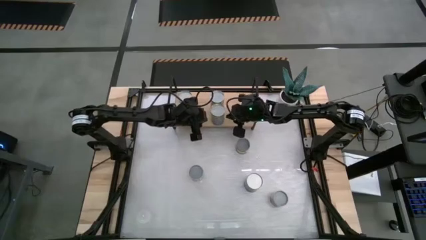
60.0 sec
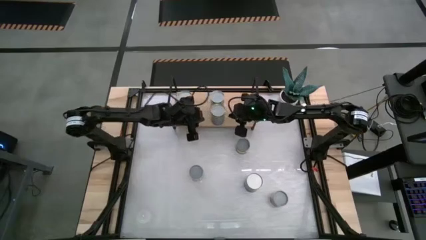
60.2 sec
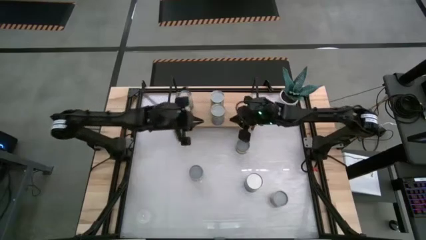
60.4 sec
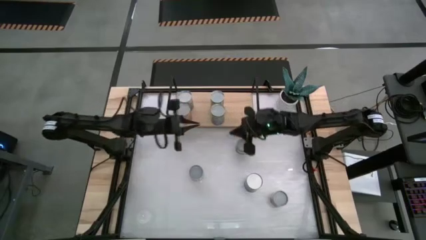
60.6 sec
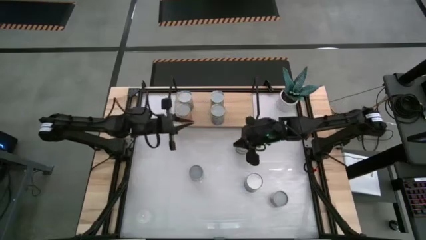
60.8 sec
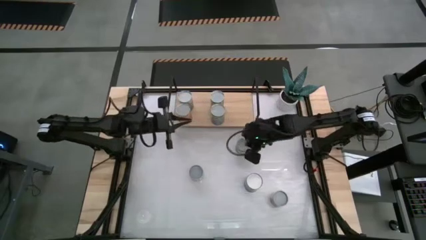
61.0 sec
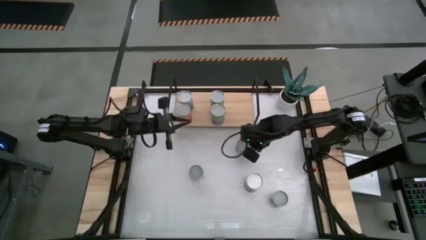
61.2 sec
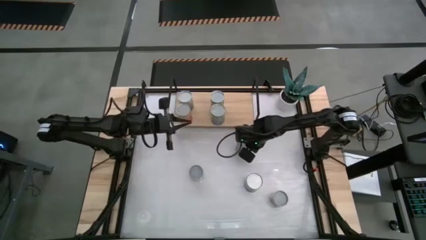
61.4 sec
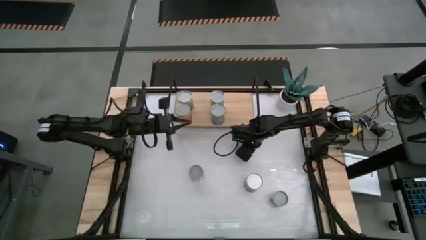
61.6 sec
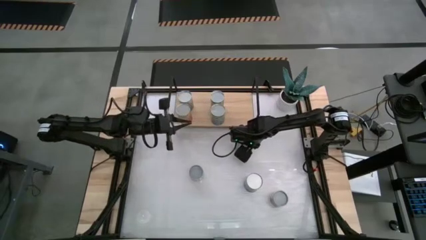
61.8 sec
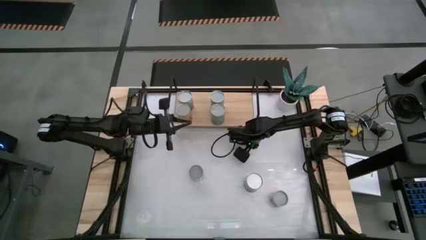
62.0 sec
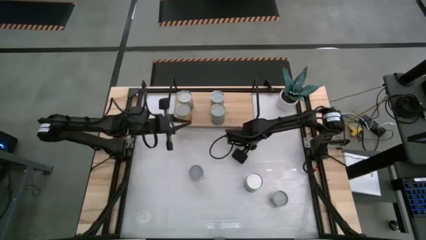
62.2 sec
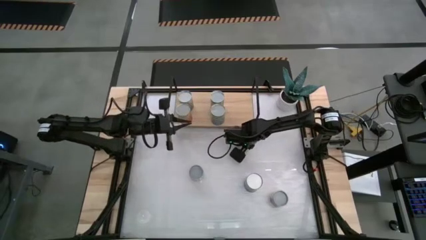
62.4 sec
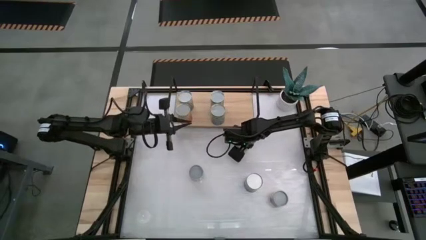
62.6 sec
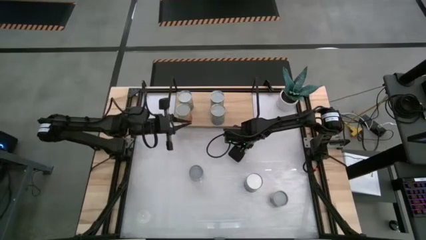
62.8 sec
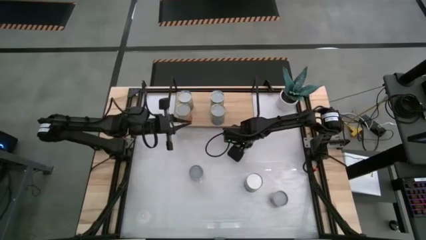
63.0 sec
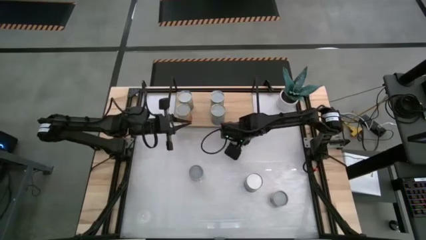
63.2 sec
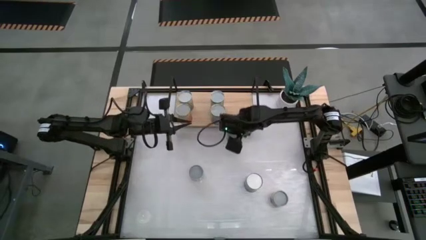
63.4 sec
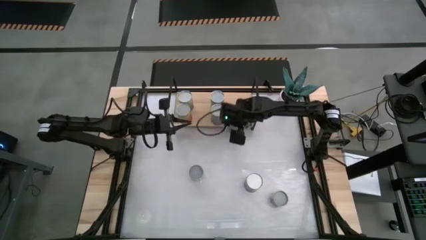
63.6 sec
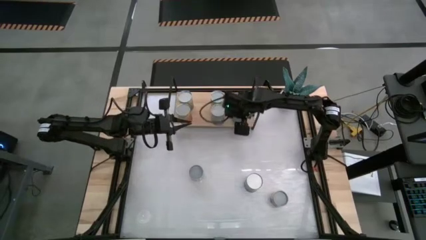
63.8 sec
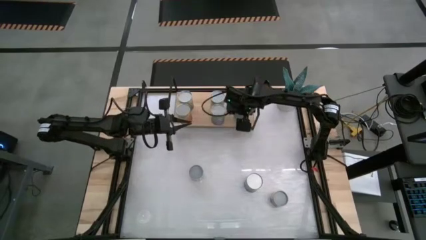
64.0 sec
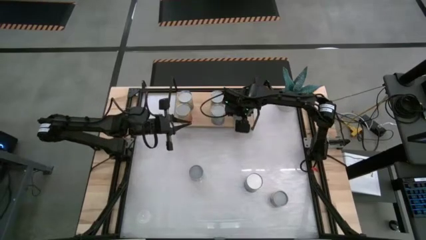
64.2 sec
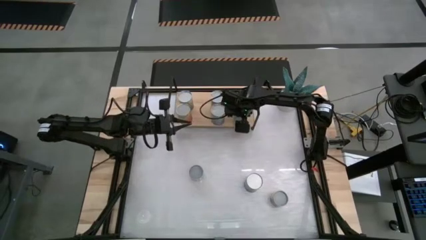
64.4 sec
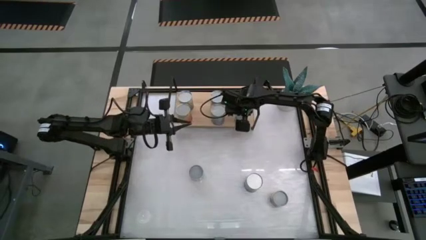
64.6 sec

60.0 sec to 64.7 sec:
Task: Pick and place cans onto a shelf
Put the canned sliced peaches on the shelf

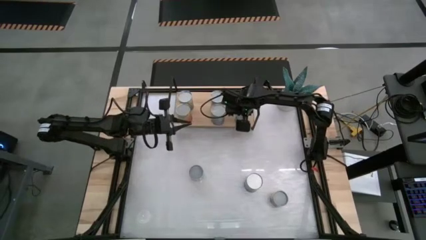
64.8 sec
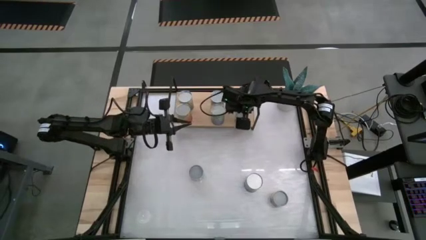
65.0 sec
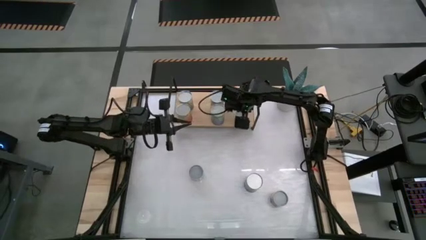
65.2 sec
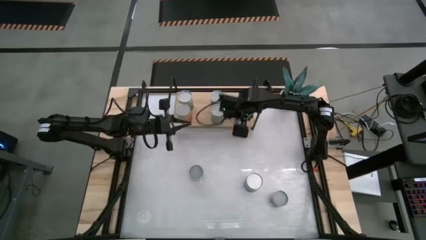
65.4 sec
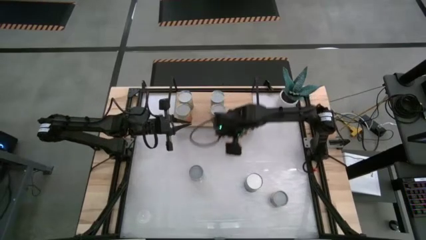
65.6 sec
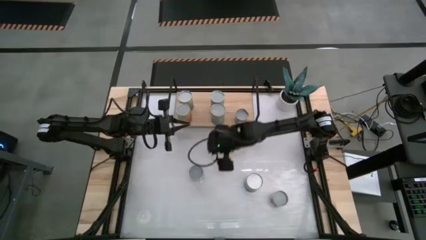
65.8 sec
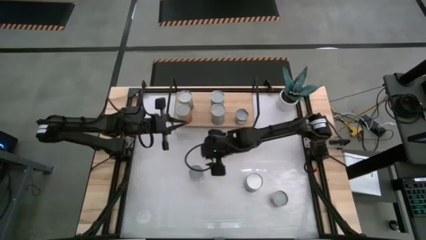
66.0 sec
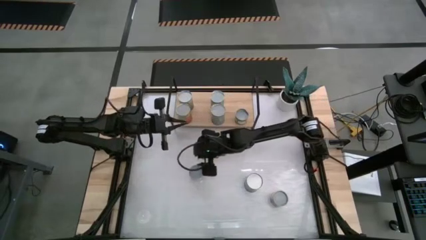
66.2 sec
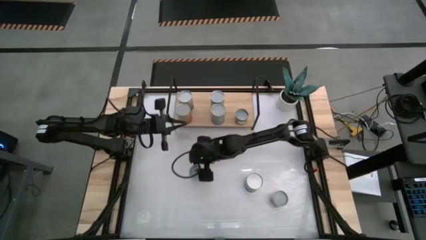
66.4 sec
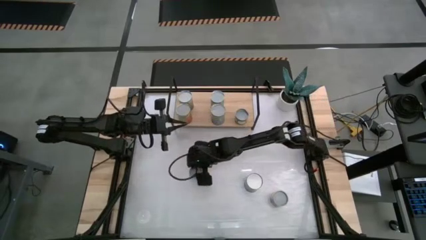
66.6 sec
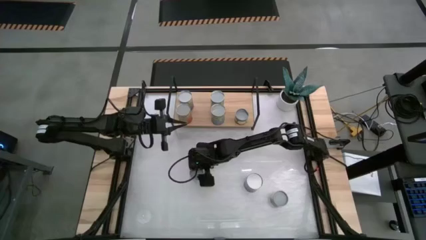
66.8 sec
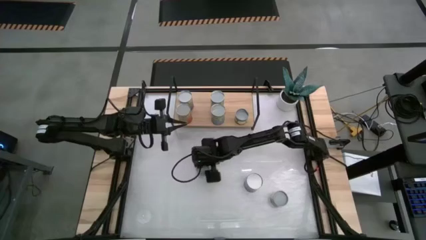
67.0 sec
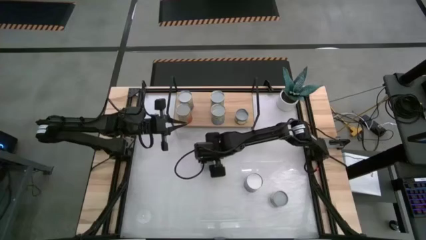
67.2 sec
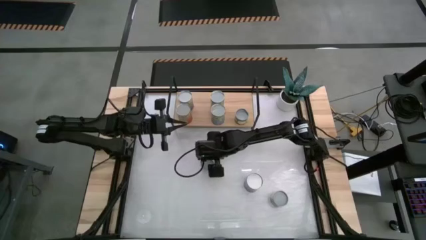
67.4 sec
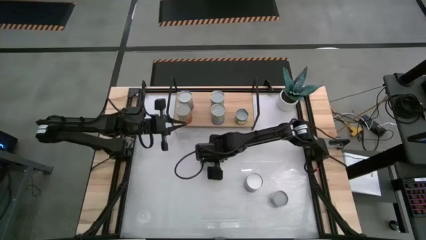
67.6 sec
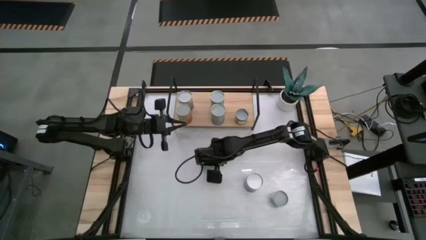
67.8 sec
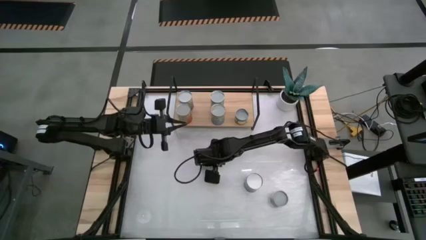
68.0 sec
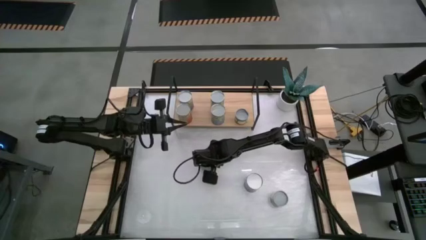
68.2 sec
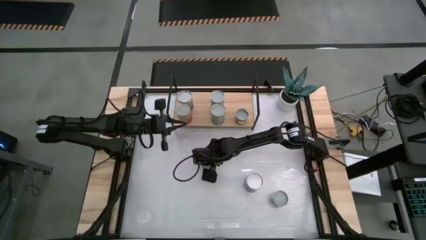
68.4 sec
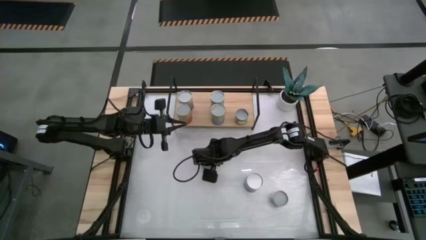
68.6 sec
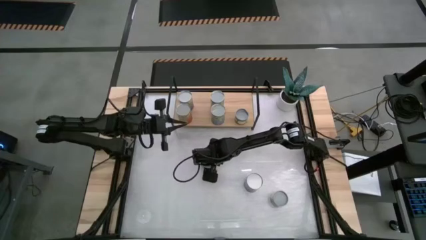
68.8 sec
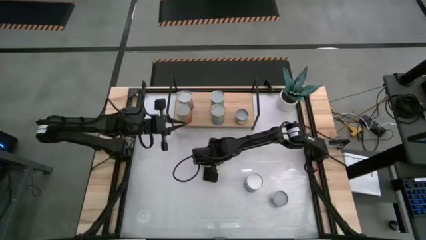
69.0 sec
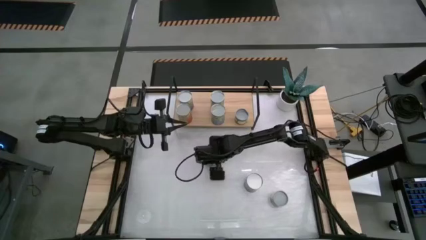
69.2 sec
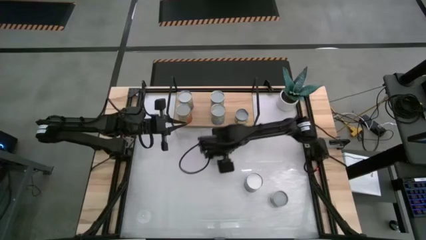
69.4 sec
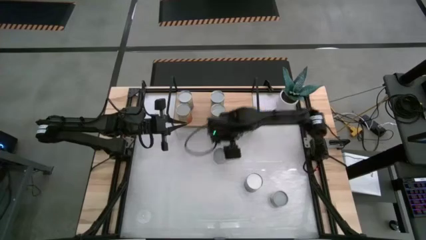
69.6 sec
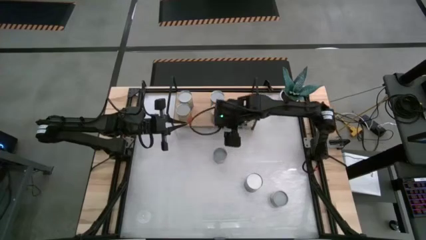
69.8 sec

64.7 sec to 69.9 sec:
Put the canned green peas on the shelf

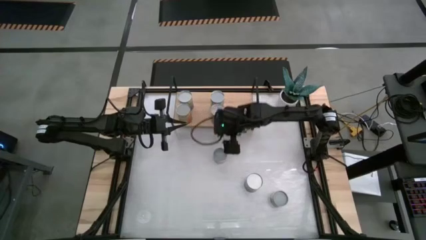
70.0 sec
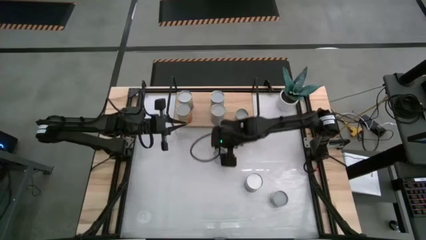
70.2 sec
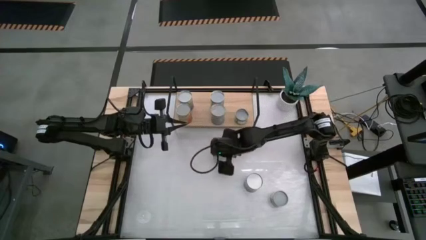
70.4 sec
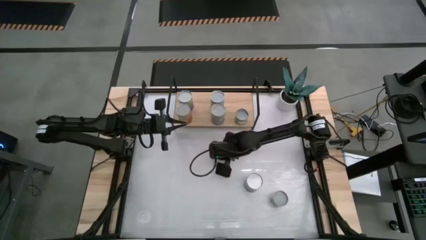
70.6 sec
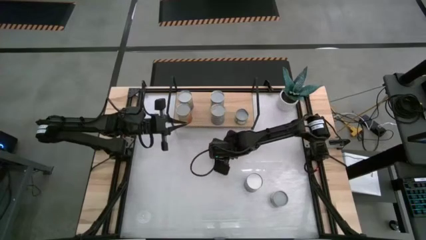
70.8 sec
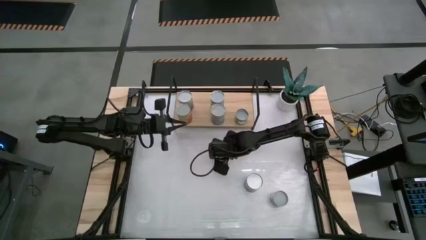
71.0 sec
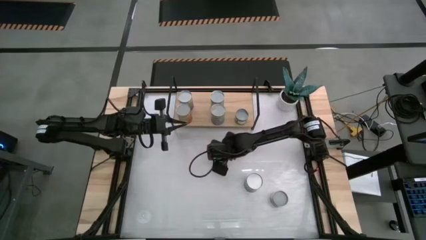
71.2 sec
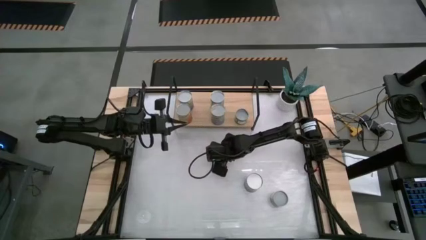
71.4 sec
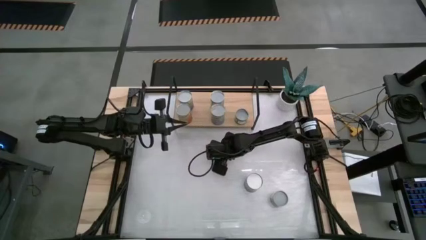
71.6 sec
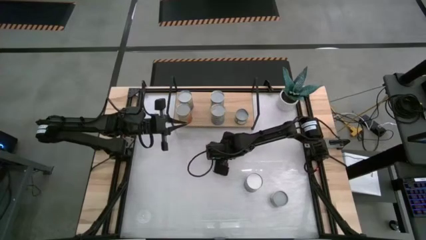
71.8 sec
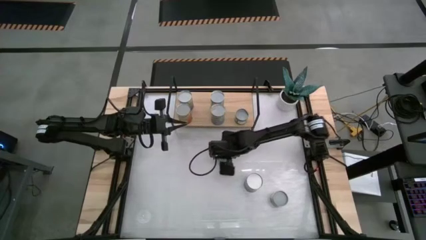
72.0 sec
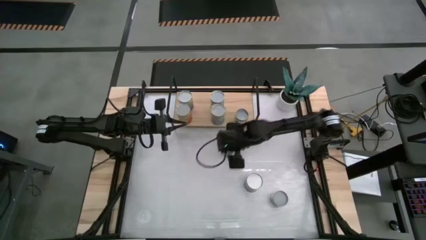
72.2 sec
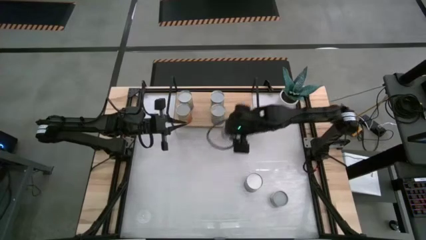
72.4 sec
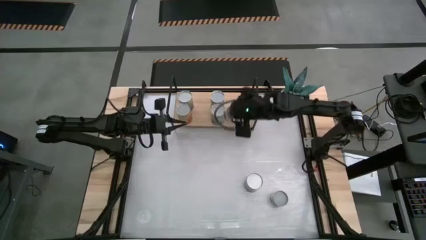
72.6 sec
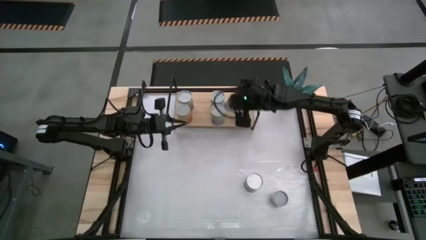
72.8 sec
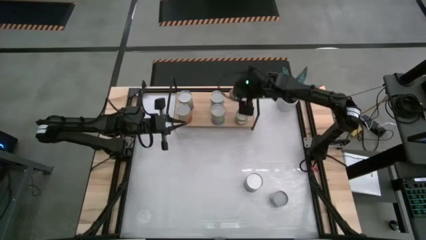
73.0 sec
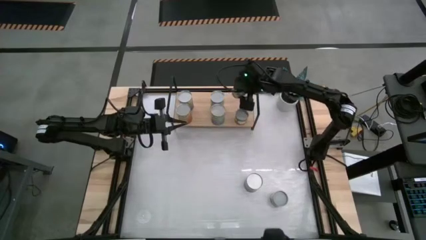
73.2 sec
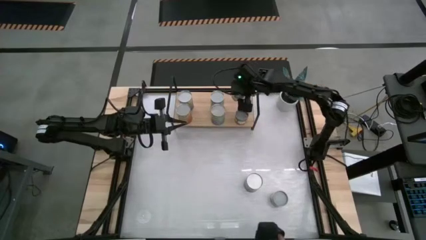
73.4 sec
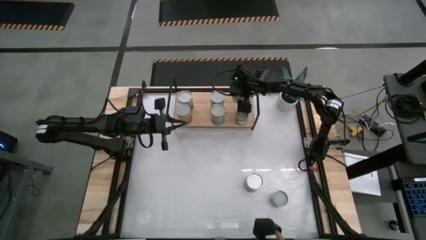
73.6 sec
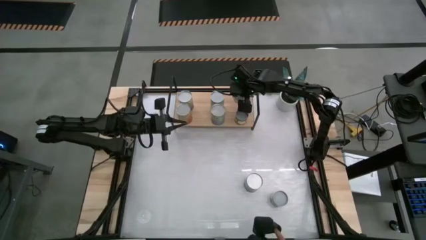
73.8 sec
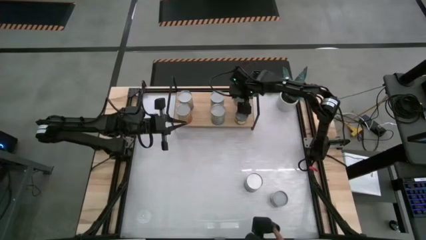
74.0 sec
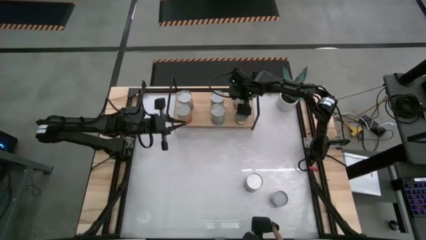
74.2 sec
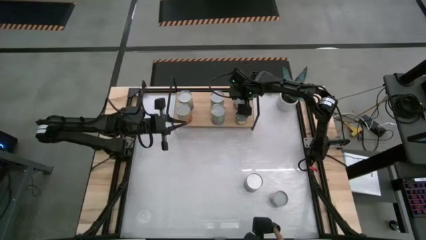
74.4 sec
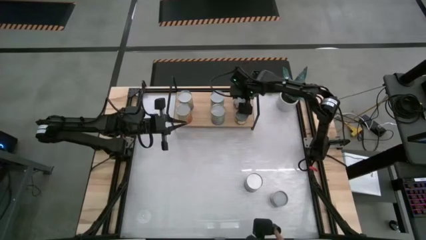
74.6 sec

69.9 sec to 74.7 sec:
Put the canned green peas on the shelf

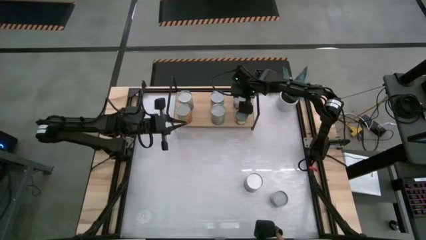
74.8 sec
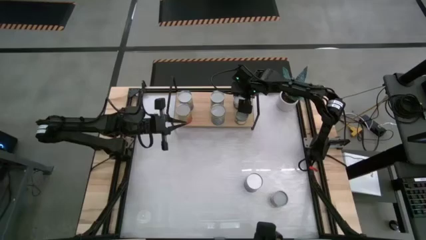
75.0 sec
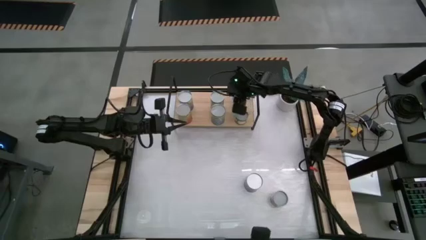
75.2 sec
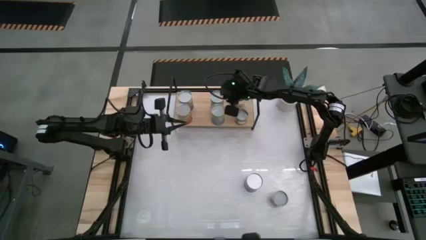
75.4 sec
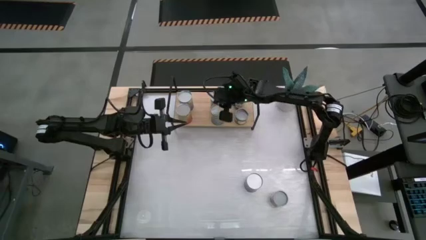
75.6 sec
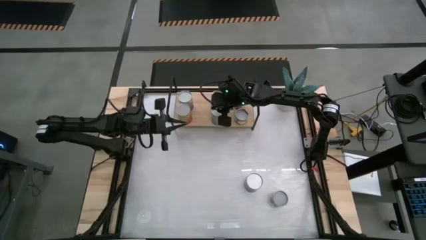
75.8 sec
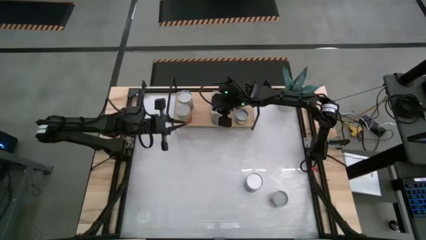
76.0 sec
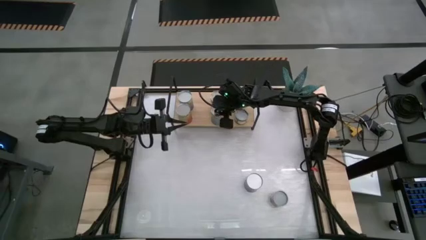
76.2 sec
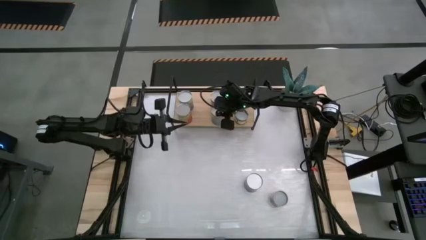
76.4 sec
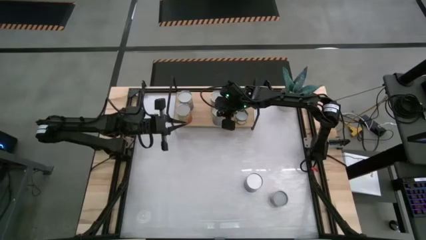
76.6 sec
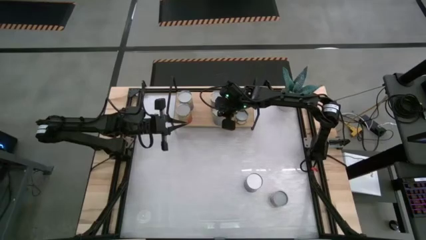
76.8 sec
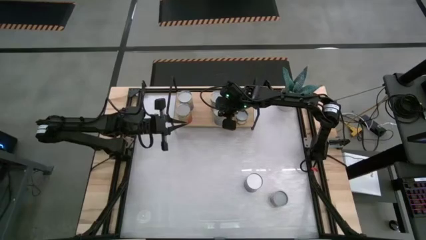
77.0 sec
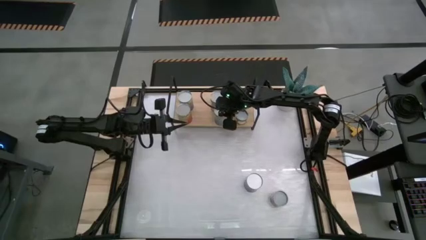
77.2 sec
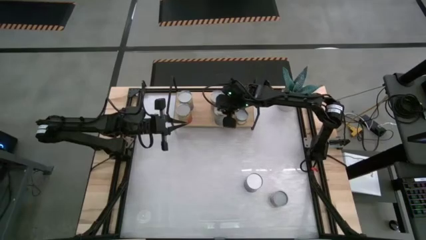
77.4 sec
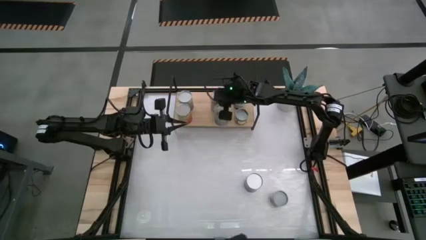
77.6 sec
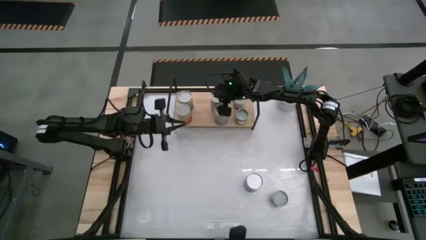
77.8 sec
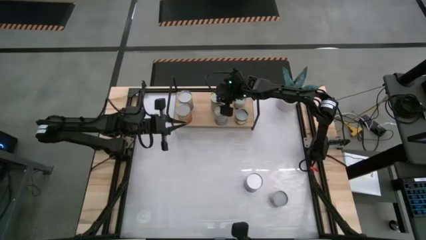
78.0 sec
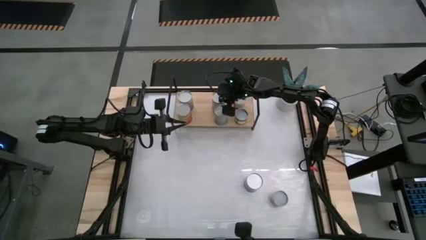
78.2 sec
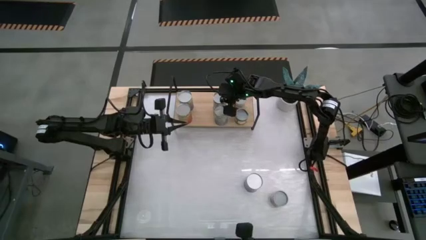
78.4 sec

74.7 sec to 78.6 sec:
Adjust the cans on the shelf
